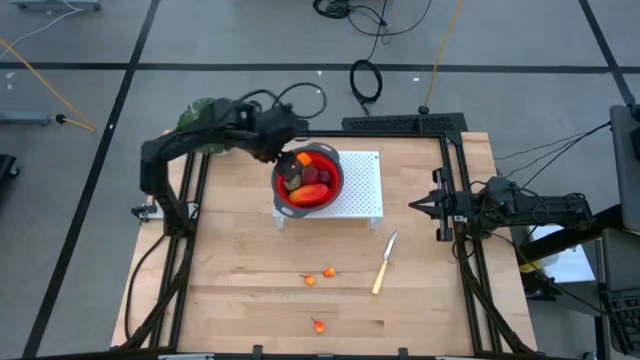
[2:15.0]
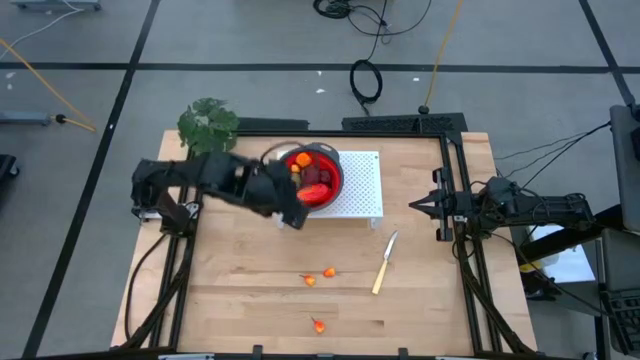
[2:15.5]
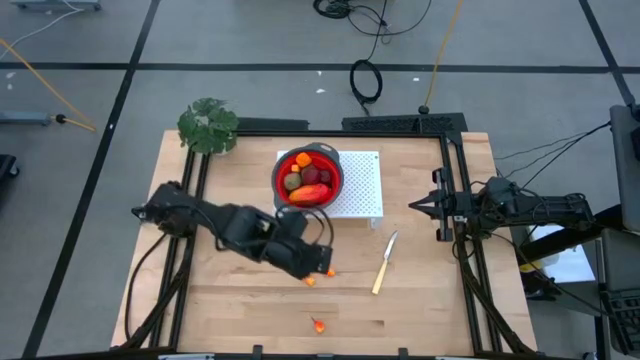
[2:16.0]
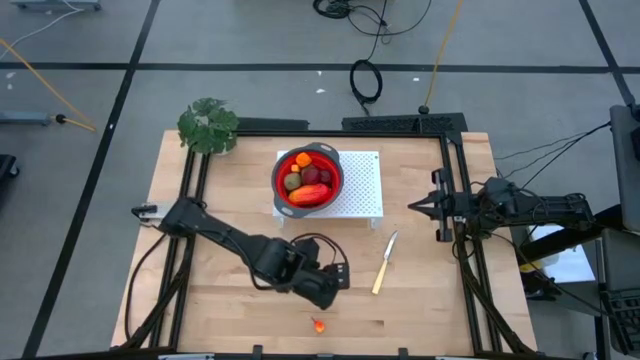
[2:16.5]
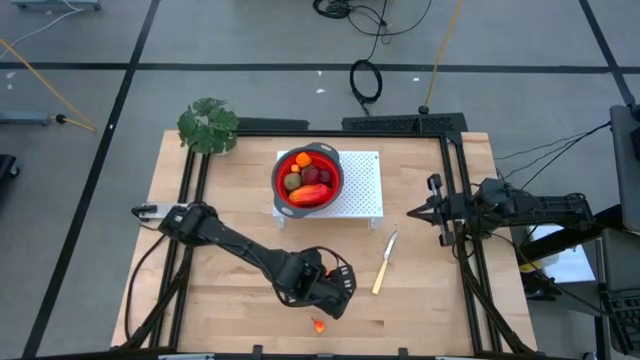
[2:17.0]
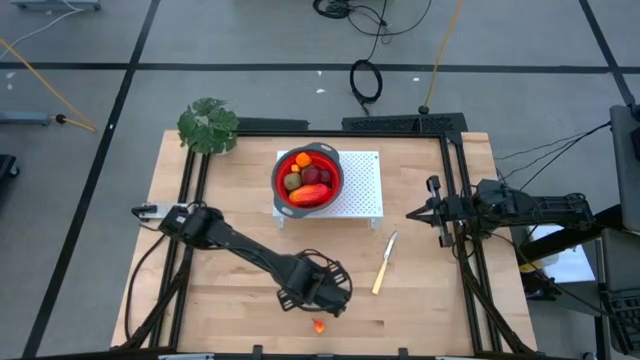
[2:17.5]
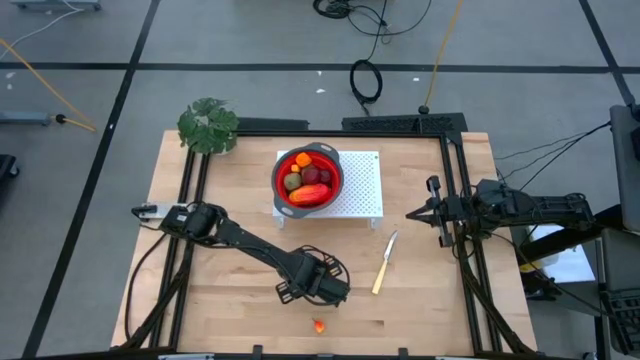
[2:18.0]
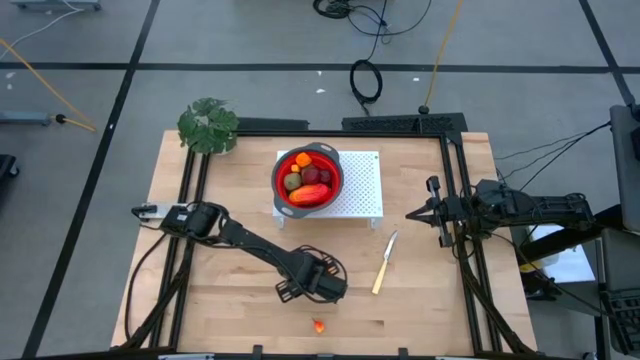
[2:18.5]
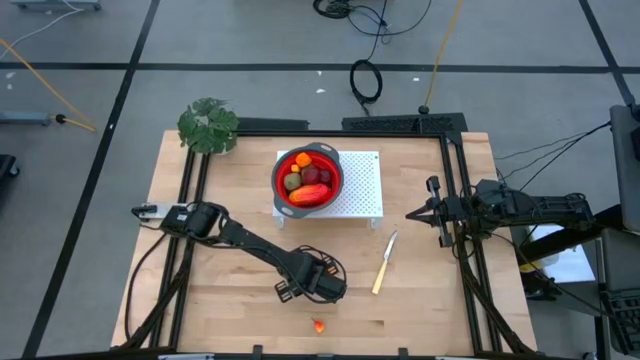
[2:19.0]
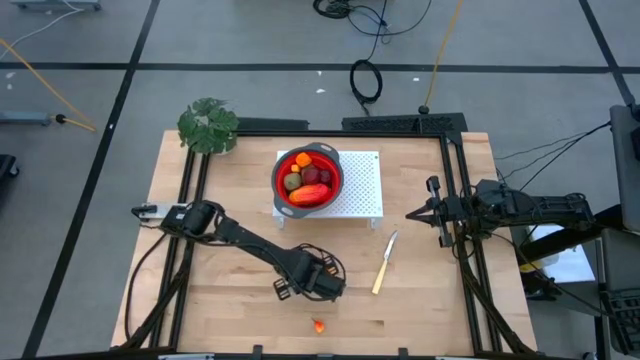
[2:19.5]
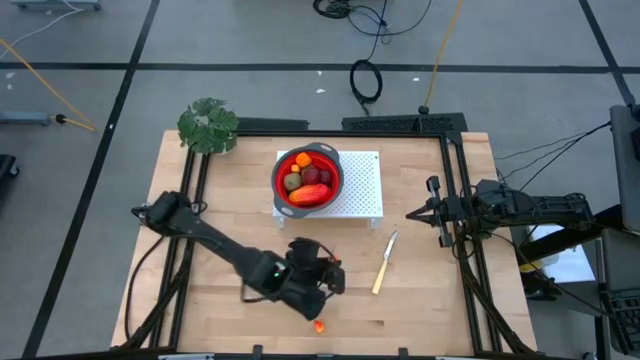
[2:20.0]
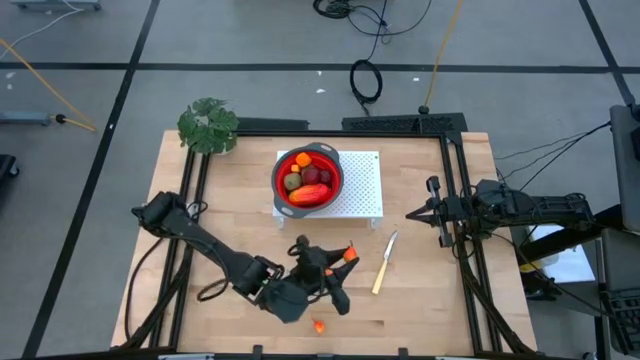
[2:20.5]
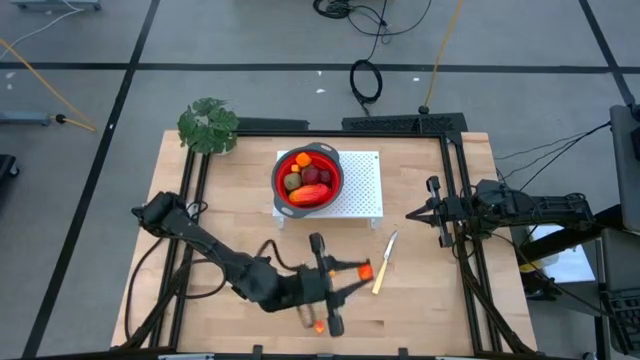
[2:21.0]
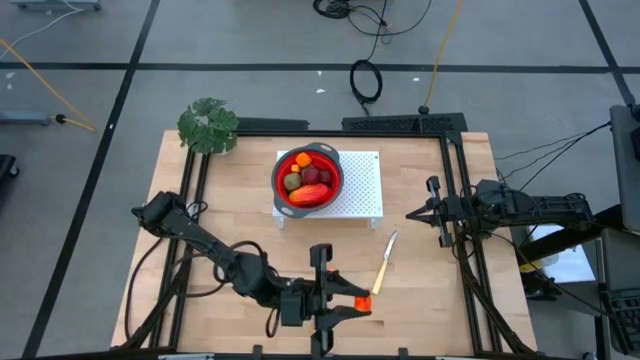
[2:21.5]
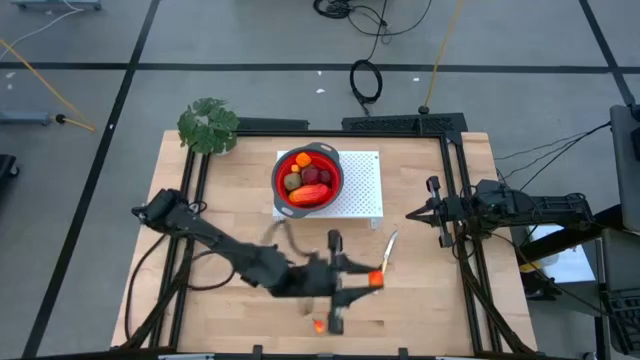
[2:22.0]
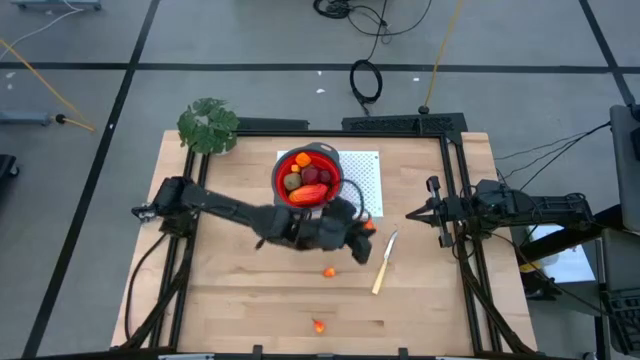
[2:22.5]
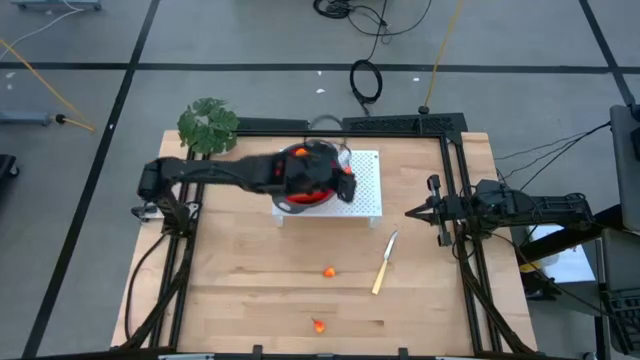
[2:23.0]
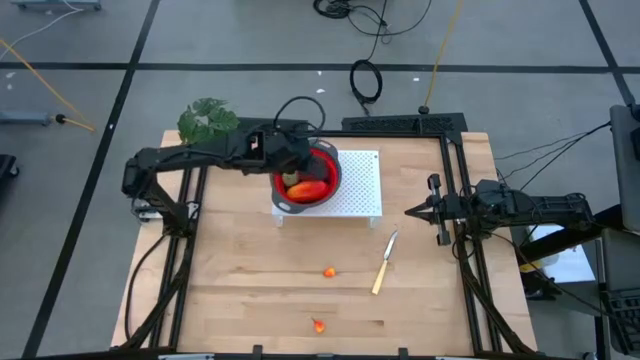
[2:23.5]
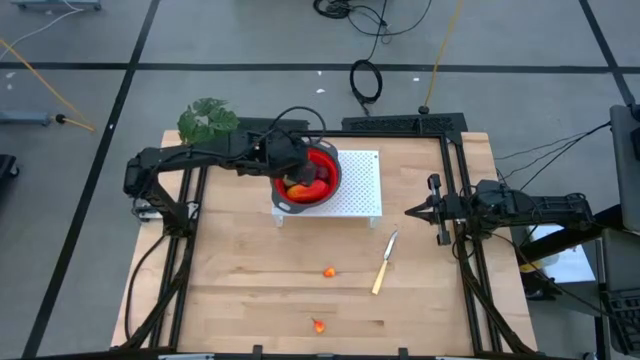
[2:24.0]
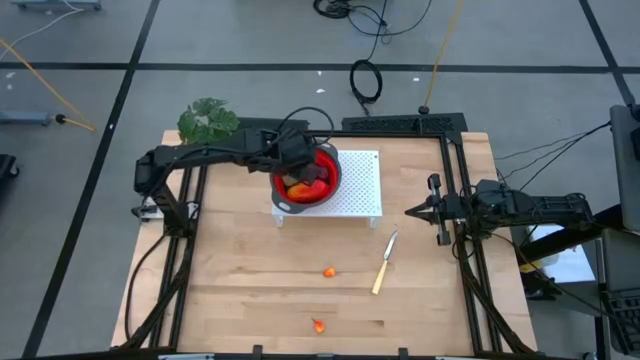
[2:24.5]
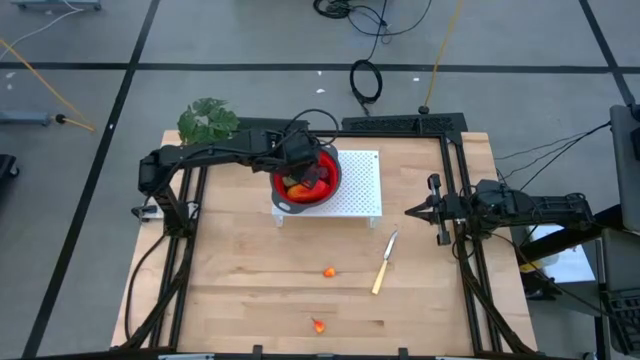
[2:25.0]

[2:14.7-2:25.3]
Task: Pick & Place Fruit
Put the orange peach into the orange strainer bowl on the shelf

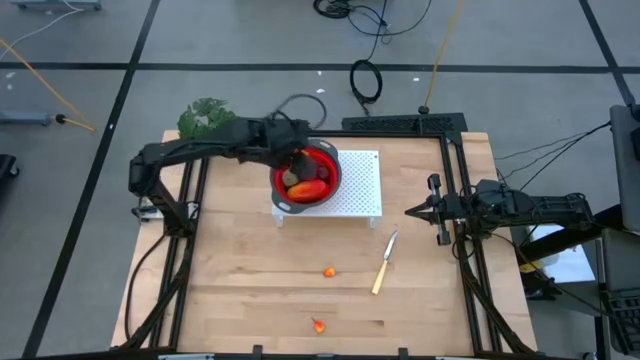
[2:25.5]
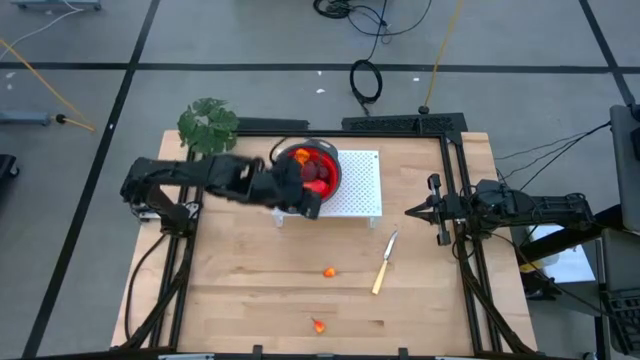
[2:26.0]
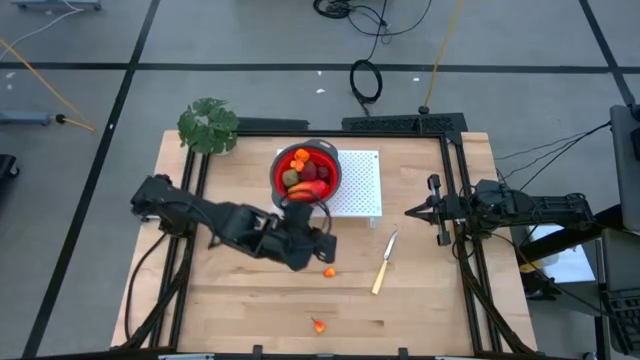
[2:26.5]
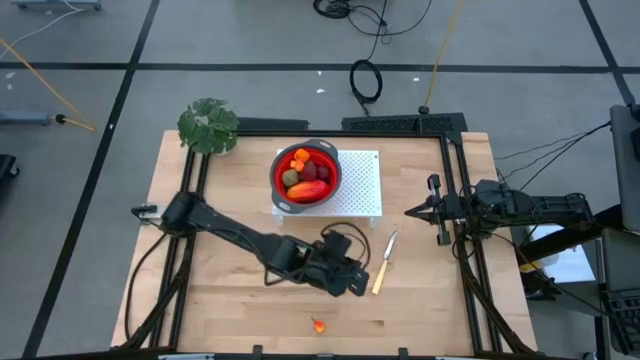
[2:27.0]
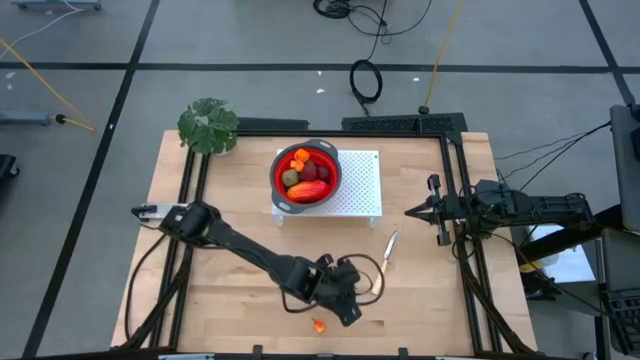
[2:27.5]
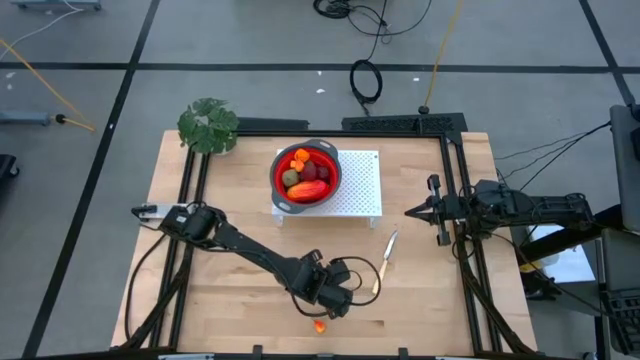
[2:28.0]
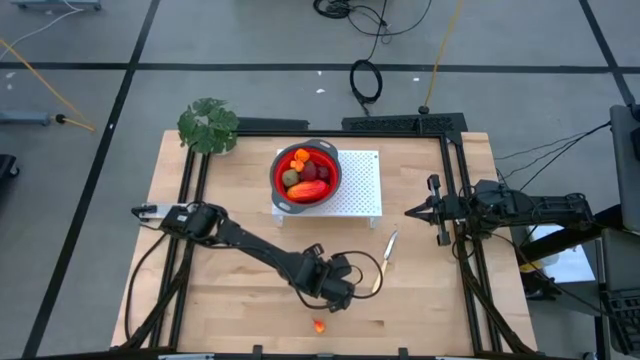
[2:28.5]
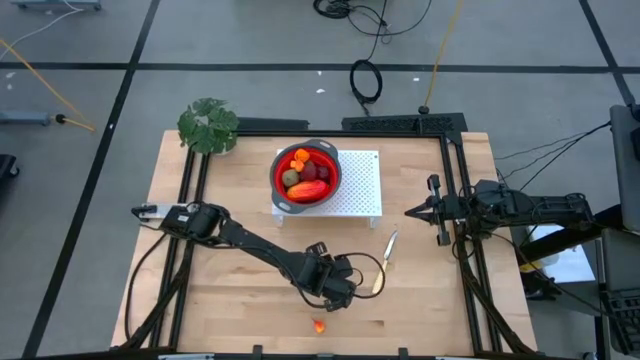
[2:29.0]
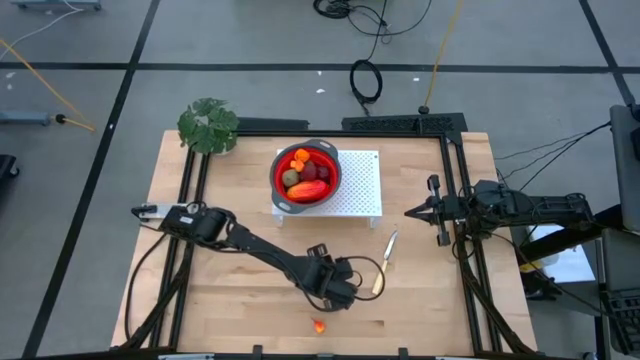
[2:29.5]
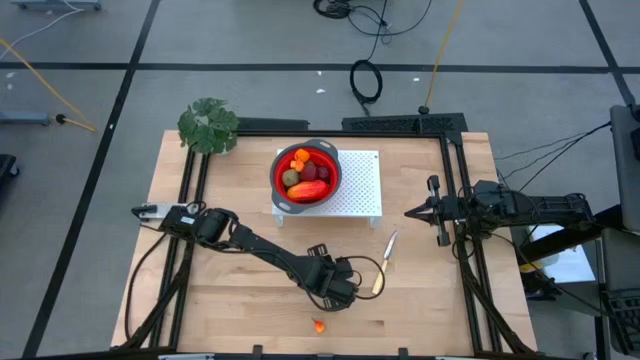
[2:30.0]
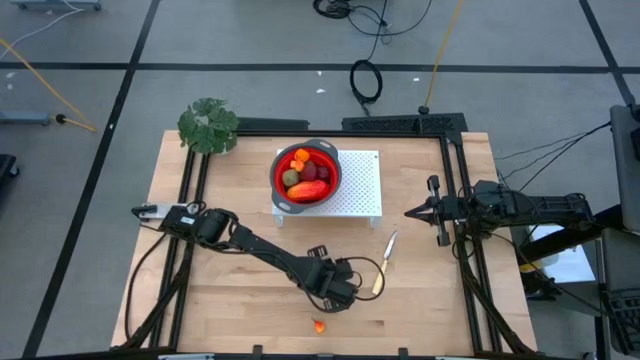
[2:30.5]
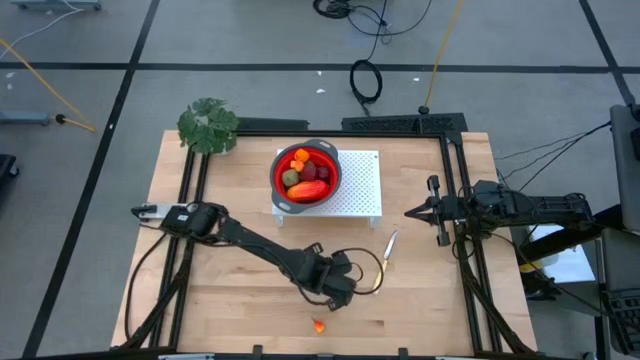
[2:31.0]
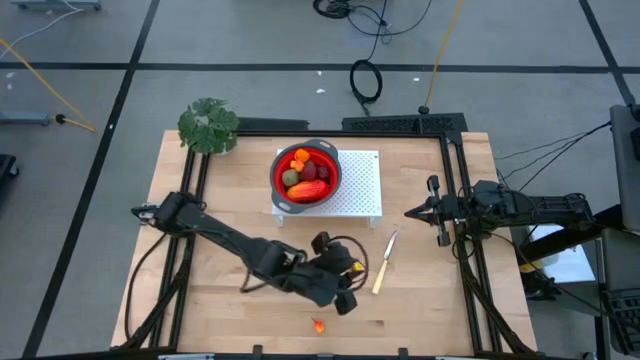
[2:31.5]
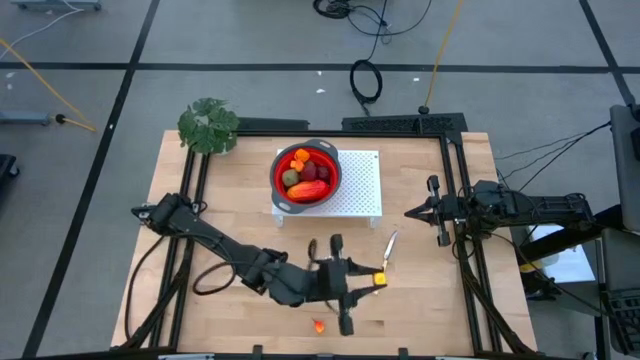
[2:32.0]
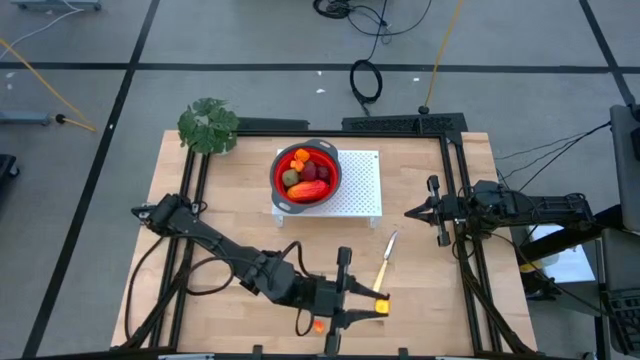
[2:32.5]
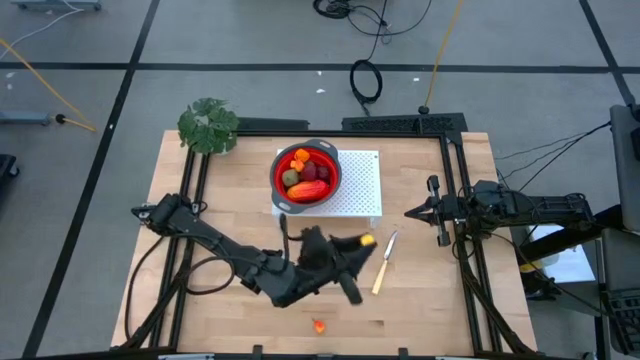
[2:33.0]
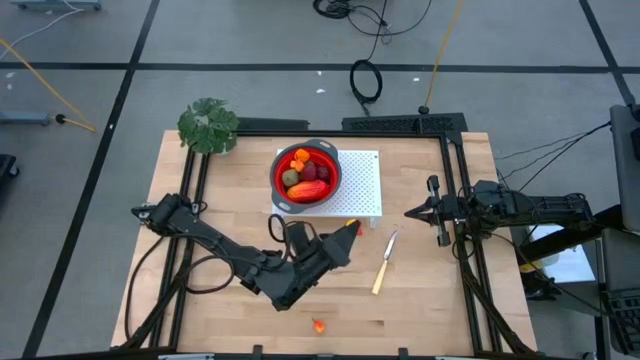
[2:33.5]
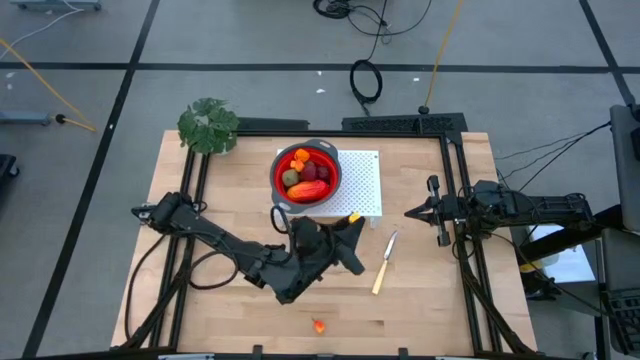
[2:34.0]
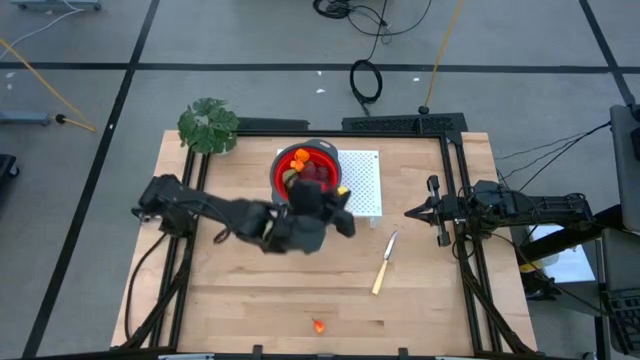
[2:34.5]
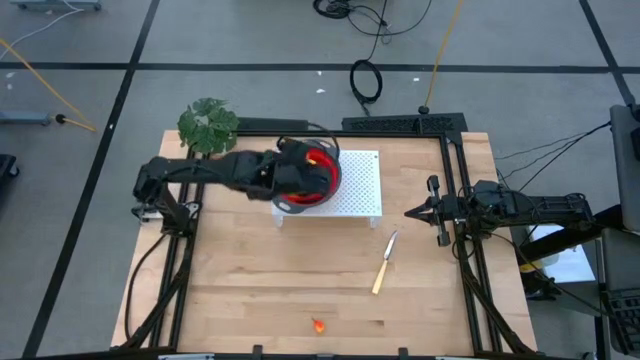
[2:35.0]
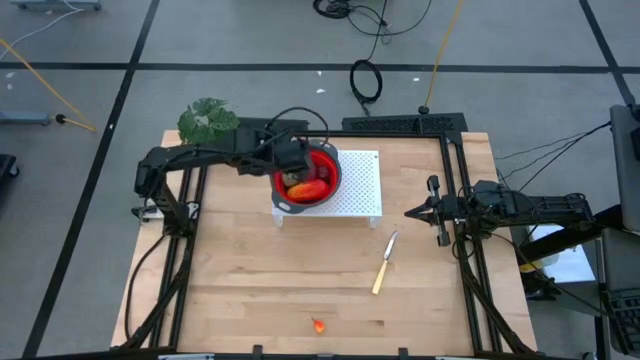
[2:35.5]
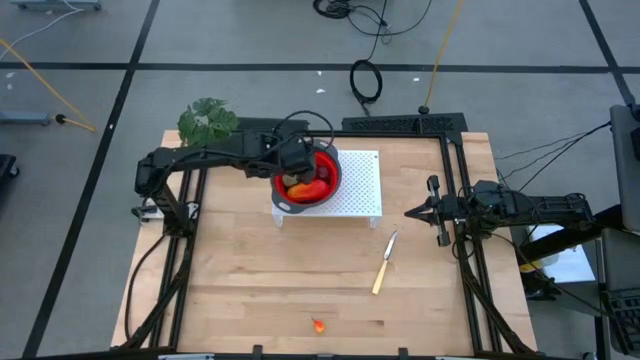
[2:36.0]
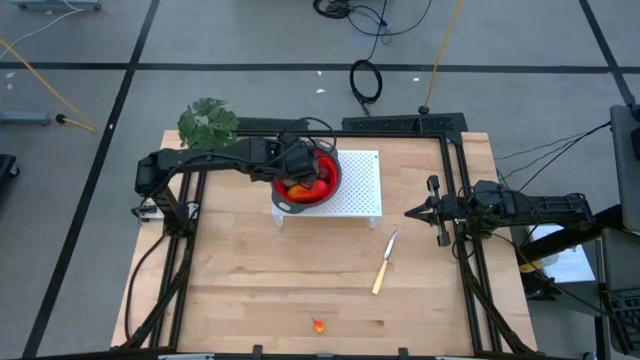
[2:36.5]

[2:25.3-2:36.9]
Put the orange peach into the orange strainer bowl on the shelf
